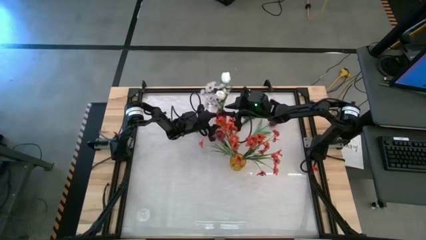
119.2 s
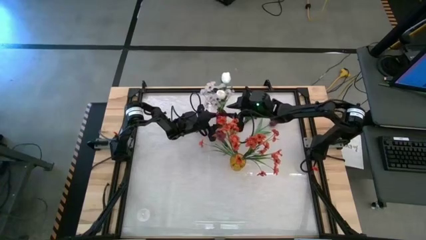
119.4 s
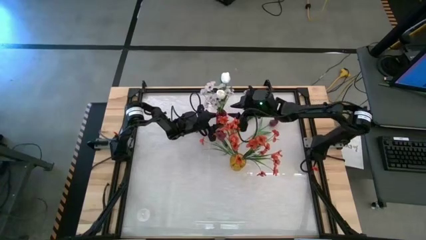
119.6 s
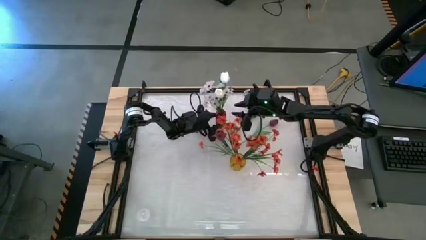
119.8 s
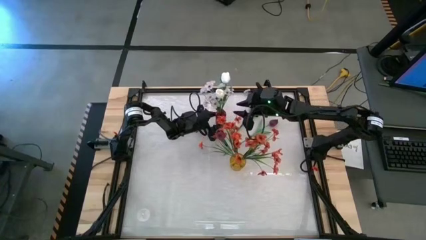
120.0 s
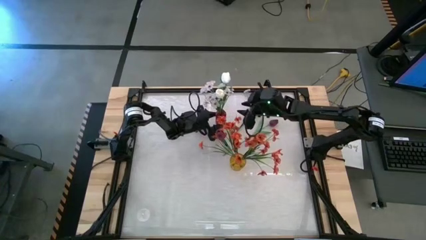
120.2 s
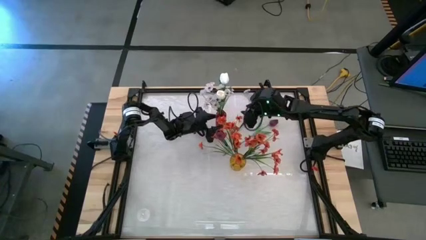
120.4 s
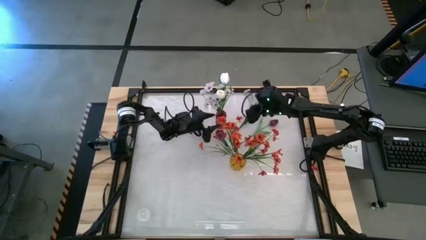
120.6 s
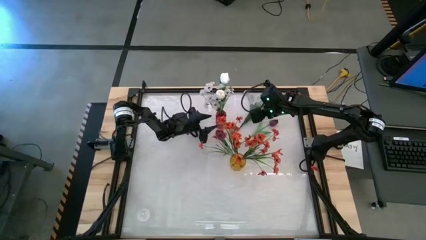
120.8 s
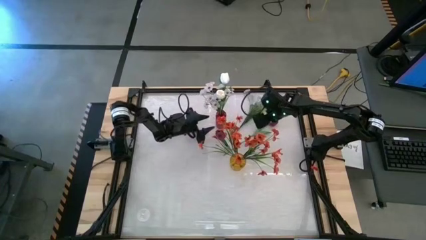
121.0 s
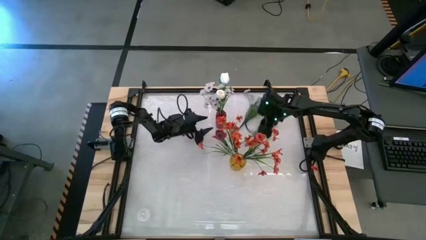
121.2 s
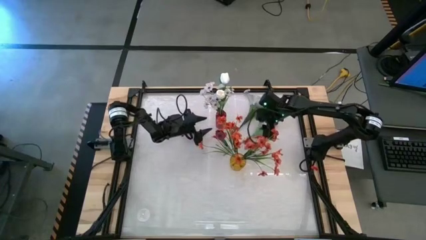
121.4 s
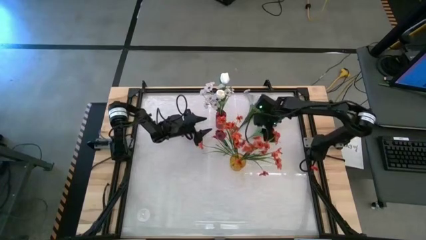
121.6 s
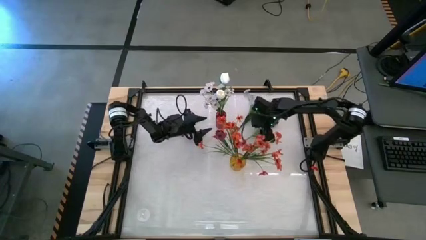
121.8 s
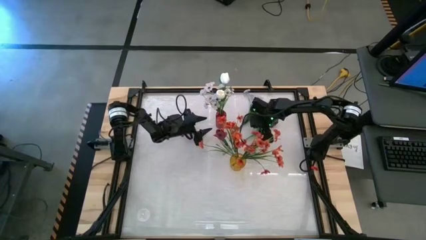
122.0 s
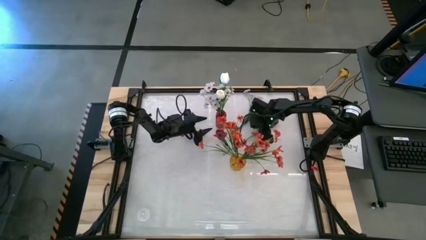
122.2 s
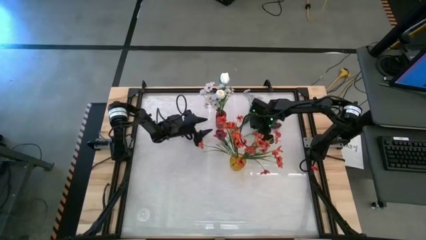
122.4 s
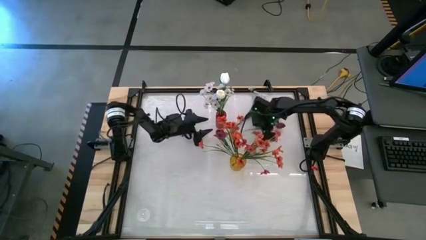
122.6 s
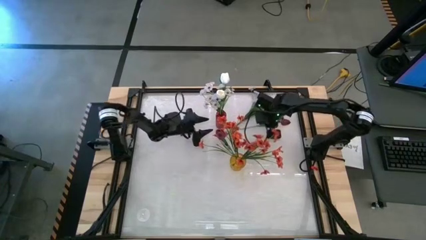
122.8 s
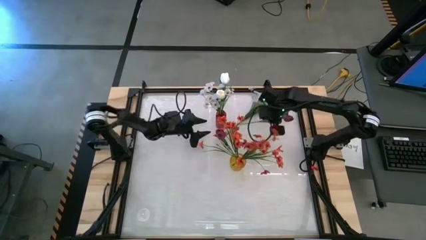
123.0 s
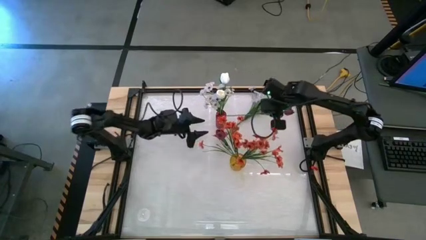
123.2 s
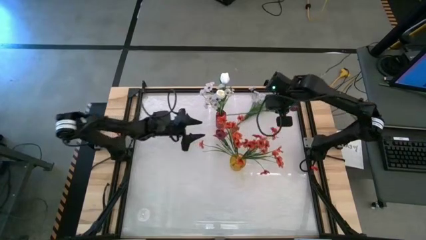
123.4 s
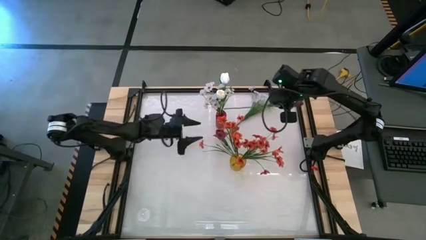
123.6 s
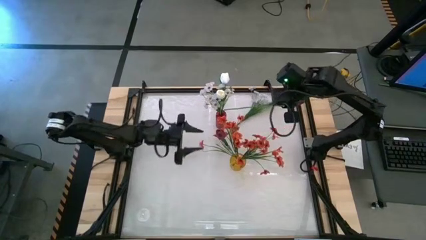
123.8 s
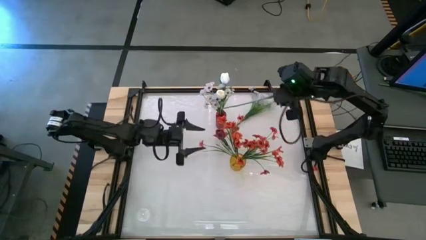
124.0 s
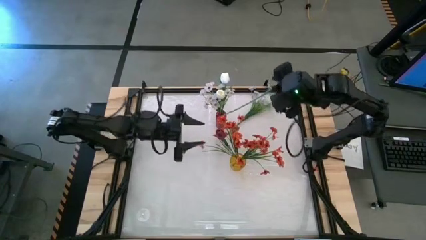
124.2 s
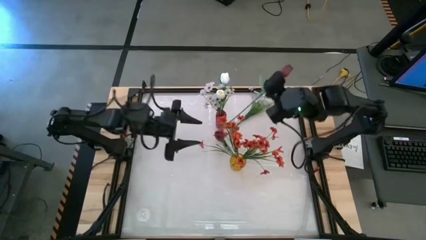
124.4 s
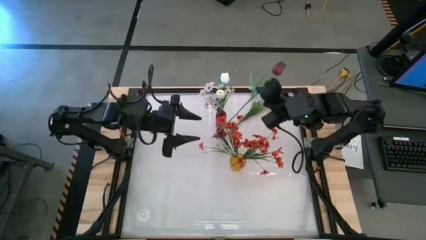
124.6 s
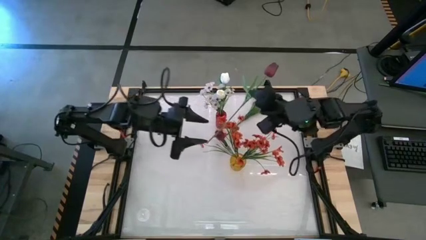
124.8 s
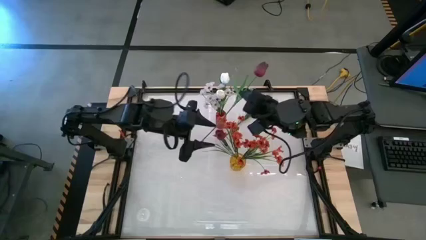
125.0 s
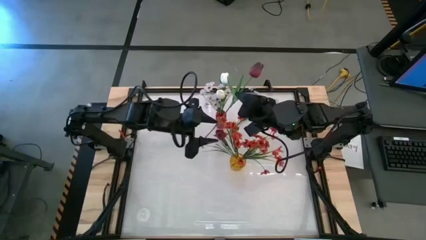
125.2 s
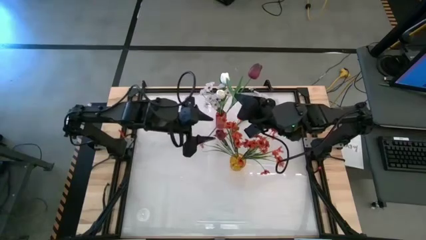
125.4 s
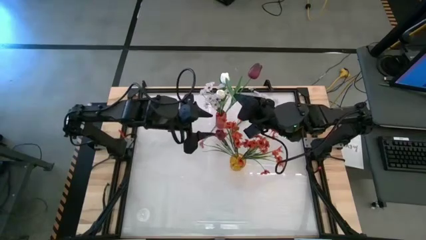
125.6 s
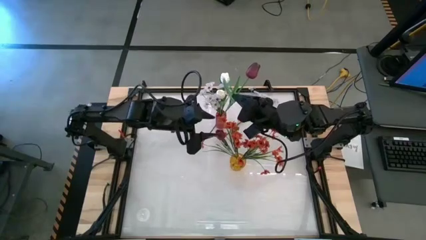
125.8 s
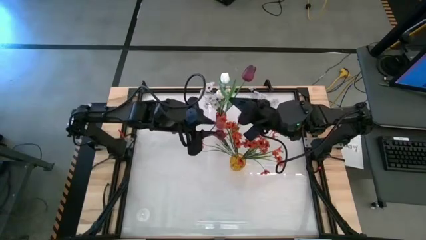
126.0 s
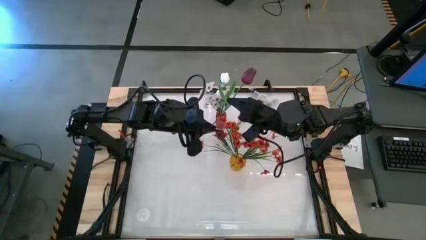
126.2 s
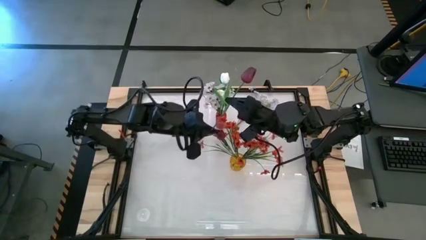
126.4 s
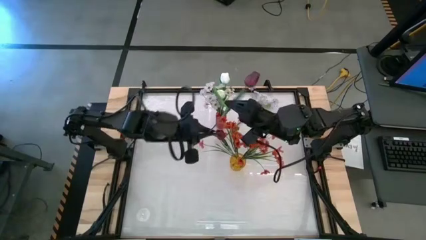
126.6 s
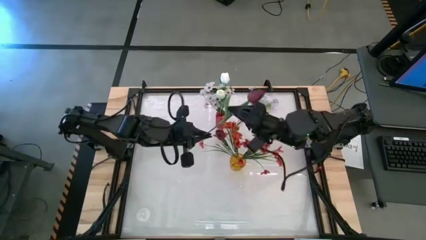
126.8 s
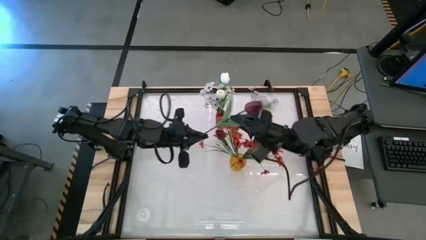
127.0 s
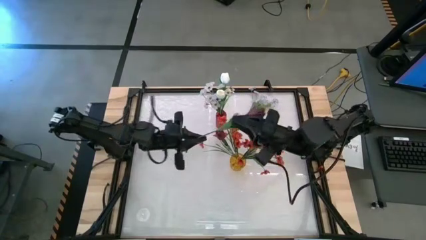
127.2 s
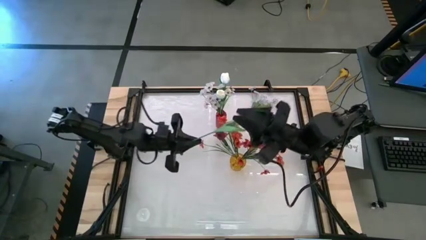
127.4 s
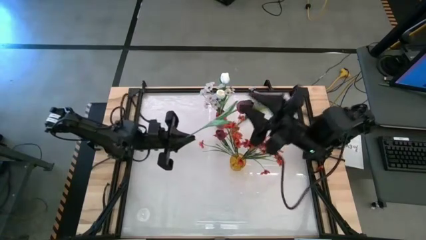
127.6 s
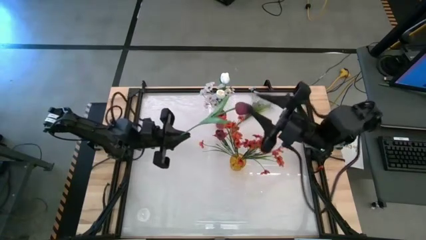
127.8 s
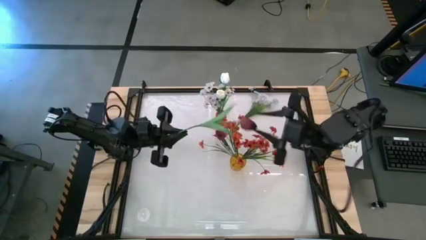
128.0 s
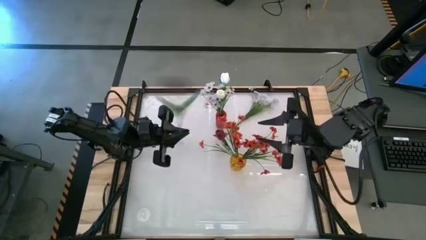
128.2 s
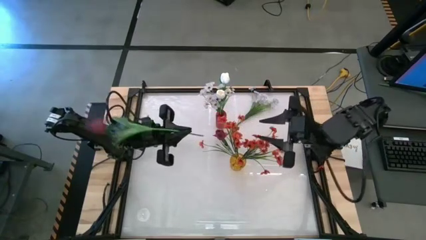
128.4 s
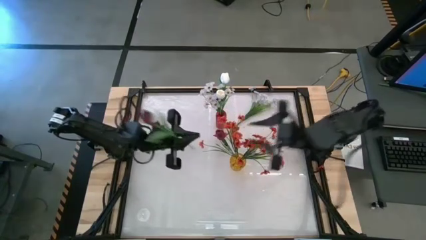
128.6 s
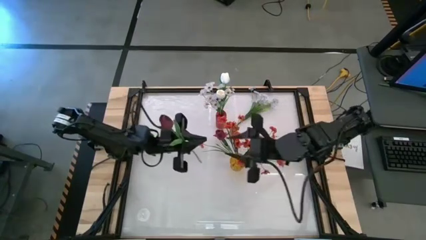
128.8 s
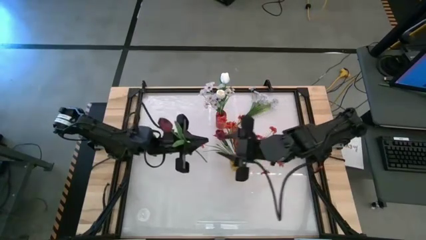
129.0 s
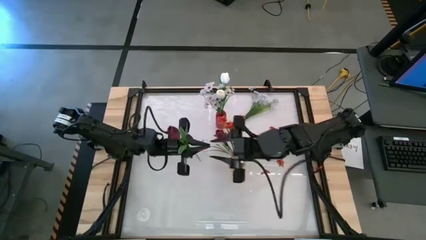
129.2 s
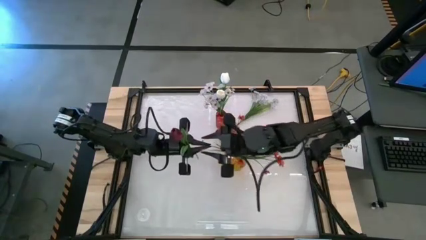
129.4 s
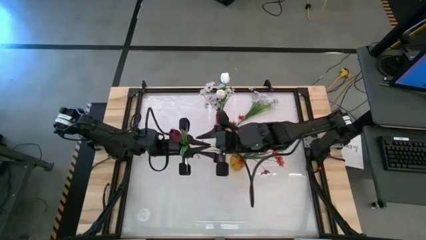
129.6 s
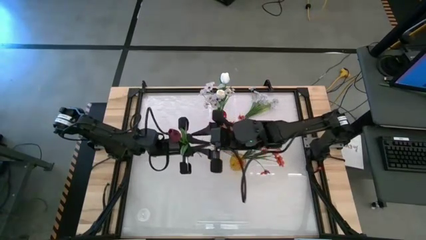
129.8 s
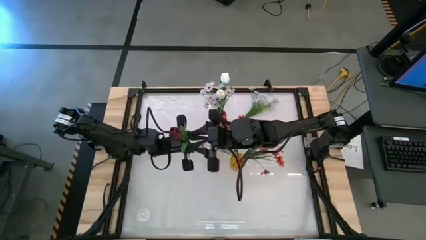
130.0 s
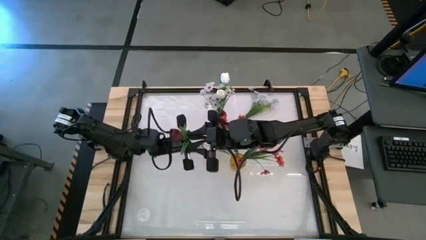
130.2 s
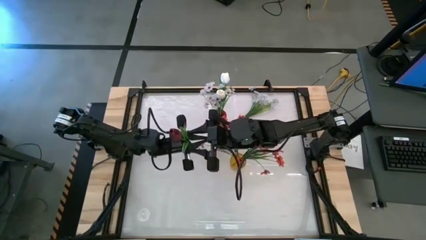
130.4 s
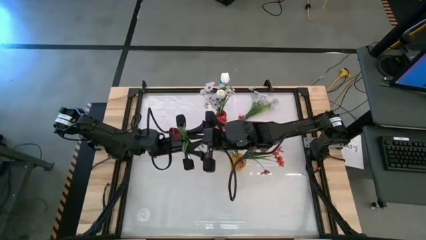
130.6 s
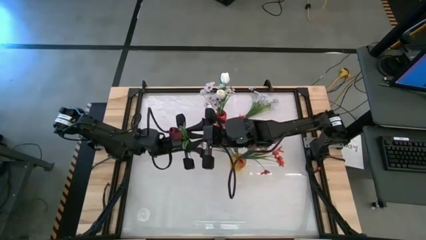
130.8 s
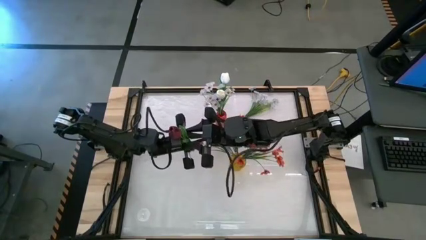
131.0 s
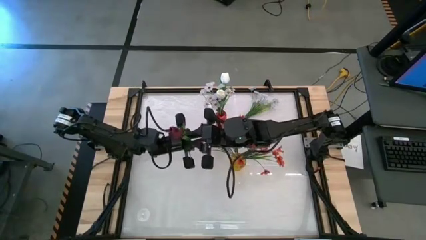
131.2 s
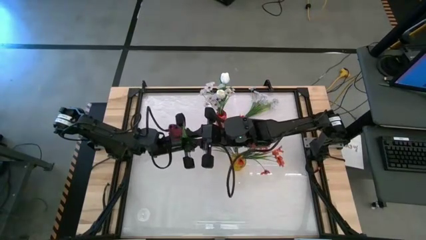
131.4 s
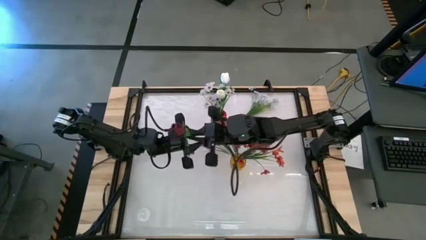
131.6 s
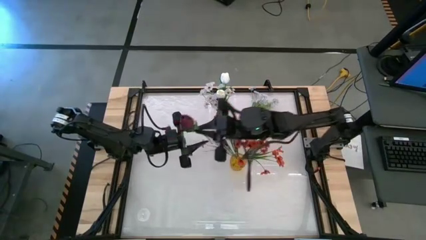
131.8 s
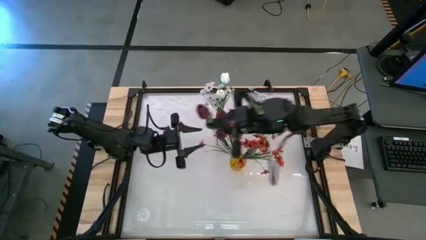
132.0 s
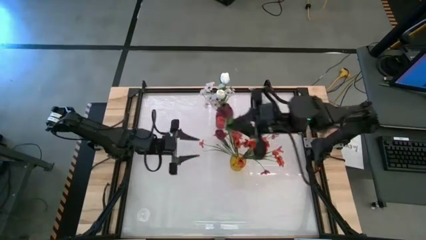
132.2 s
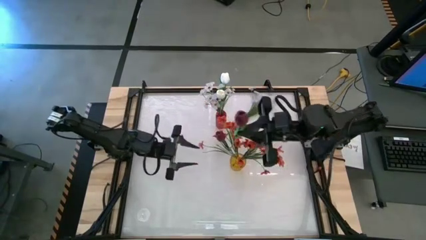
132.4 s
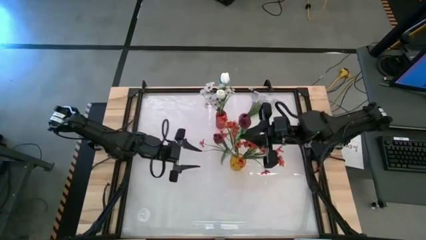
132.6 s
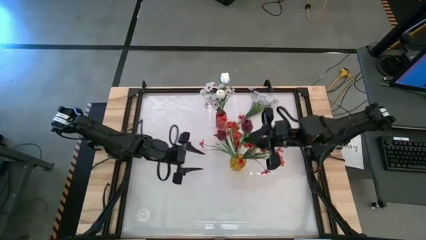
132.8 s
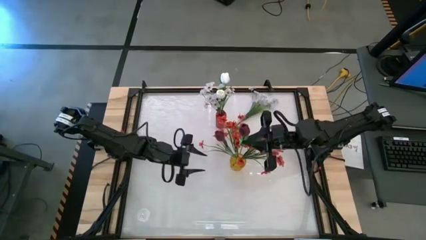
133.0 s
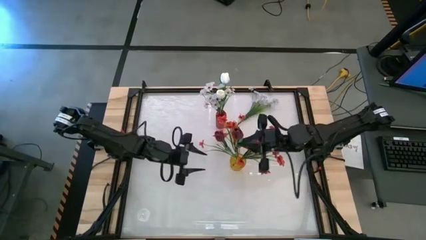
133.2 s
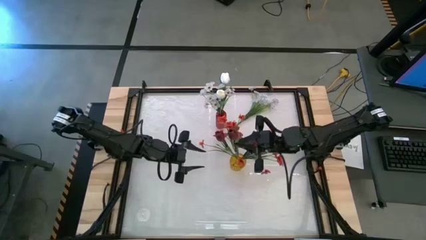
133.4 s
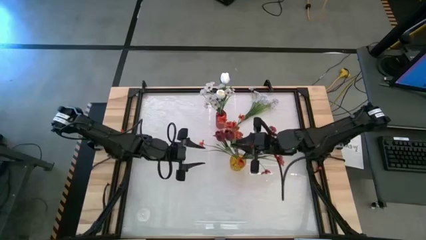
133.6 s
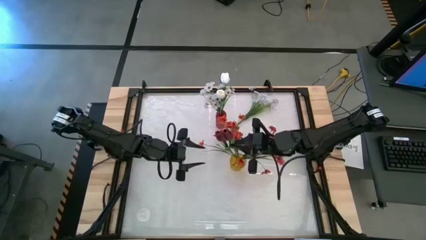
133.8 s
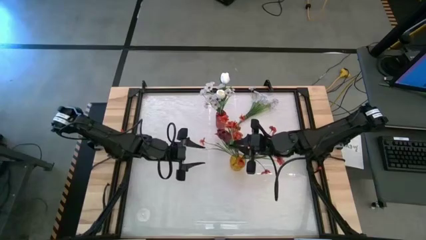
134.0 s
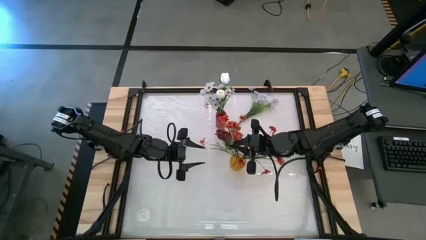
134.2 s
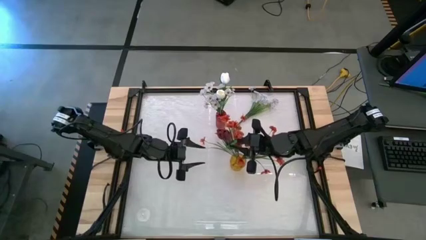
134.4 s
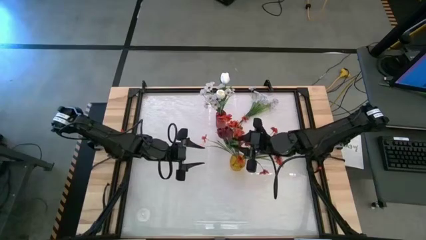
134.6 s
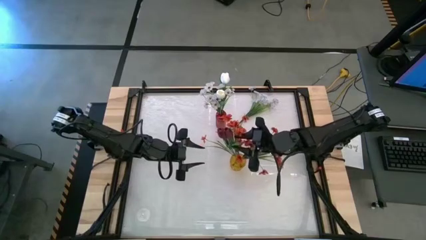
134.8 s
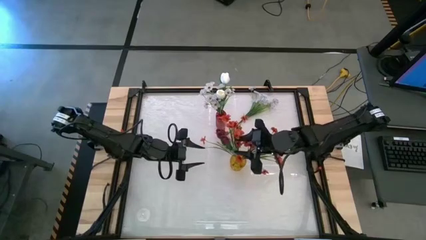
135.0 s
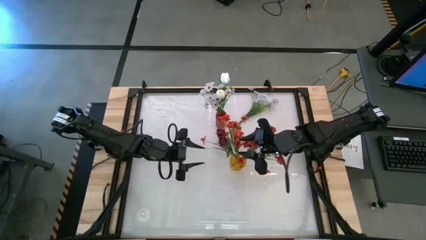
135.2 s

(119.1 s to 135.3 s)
Task: Sort flowers into vase by color
Put the red flower into the yellow vase

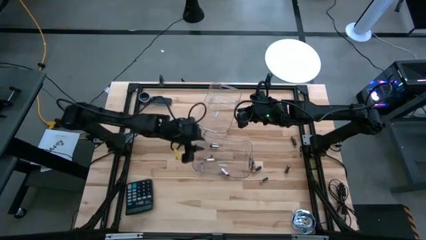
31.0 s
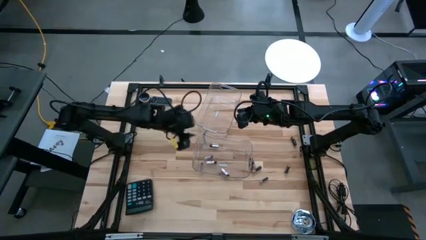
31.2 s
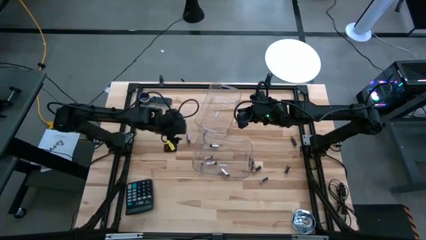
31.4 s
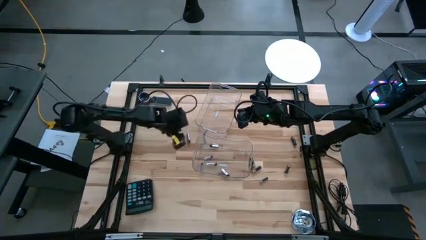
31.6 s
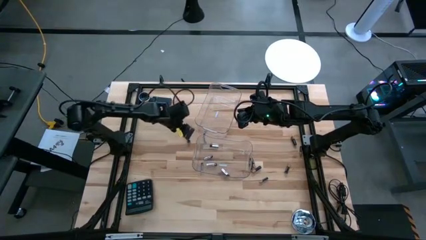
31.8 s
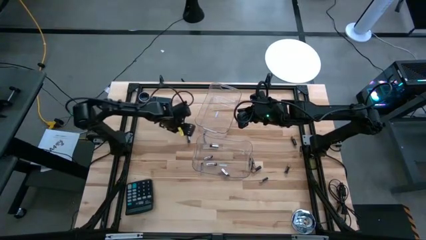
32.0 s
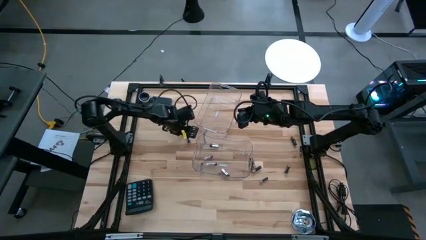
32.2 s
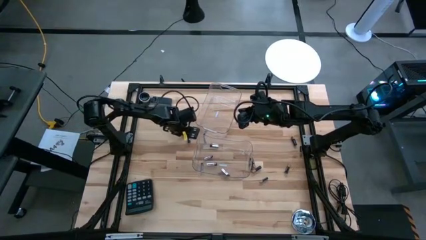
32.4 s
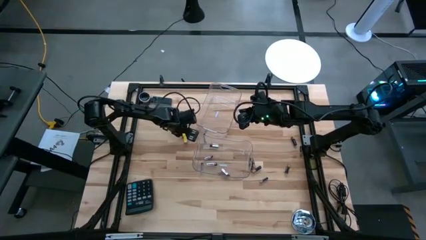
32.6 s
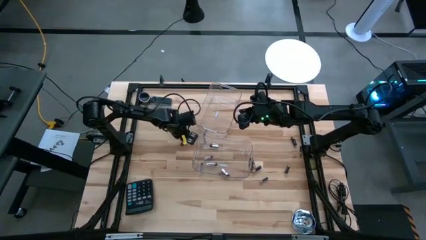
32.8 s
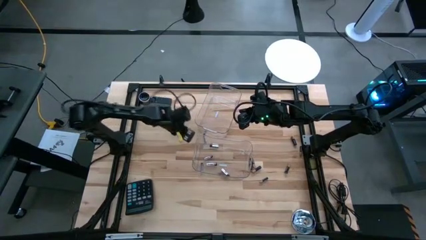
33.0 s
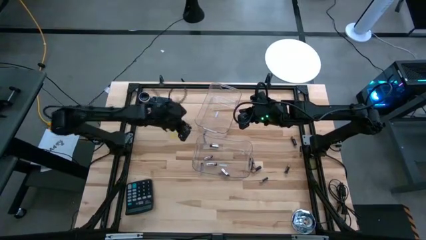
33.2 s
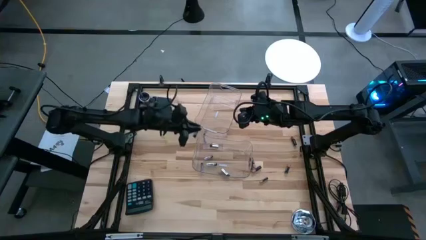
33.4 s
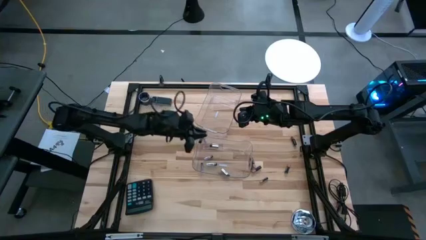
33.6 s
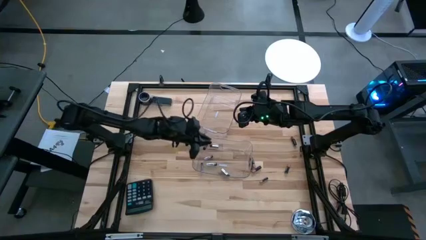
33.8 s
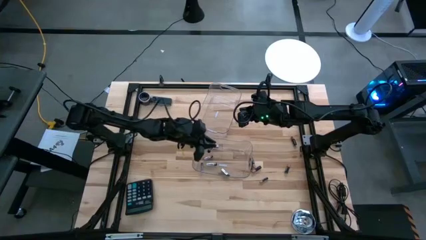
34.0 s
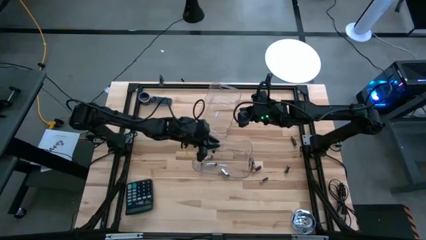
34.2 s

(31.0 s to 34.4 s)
Task: Sort batteries
Put the silver battery into the bottom transparent bin
